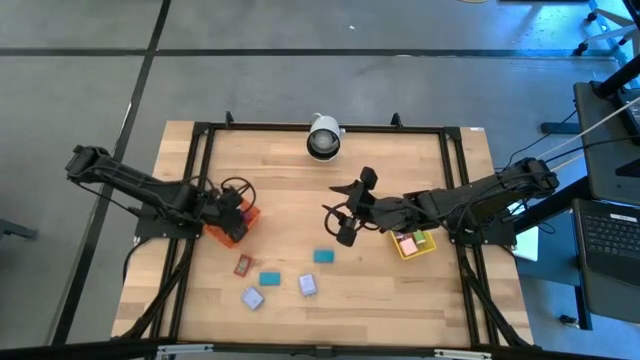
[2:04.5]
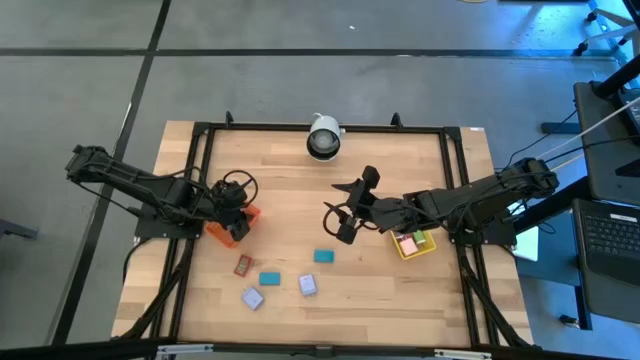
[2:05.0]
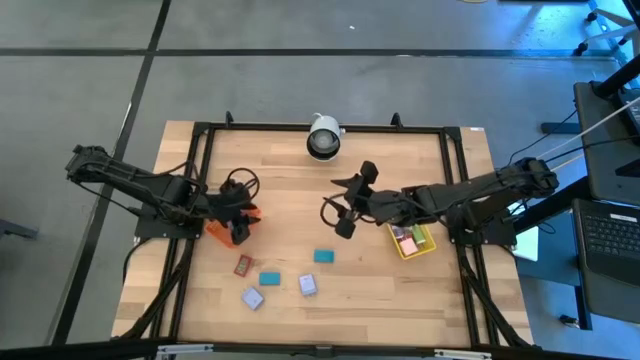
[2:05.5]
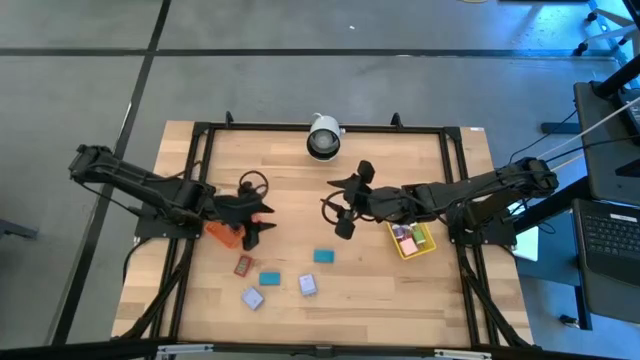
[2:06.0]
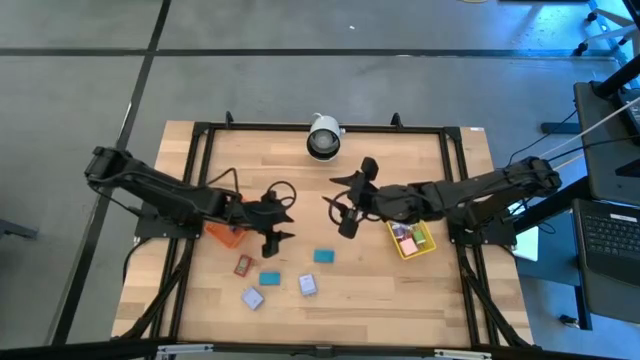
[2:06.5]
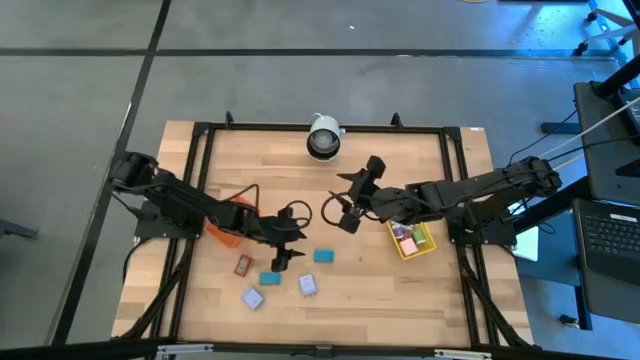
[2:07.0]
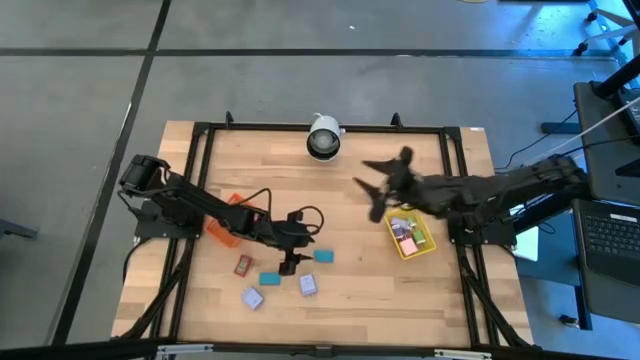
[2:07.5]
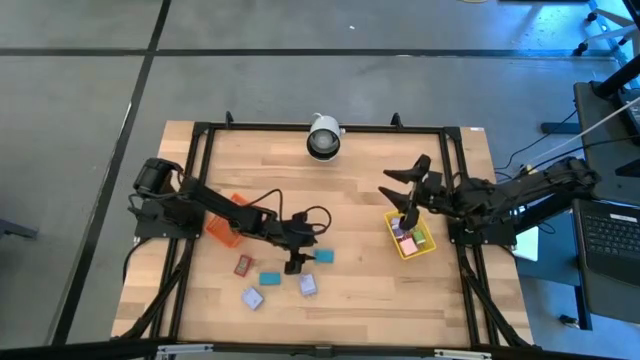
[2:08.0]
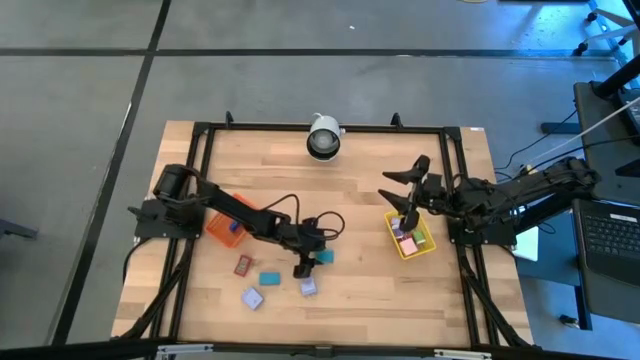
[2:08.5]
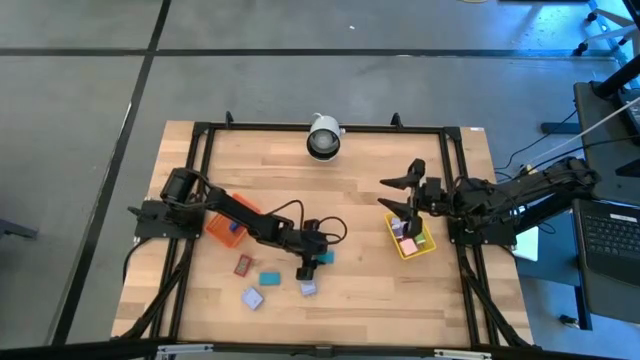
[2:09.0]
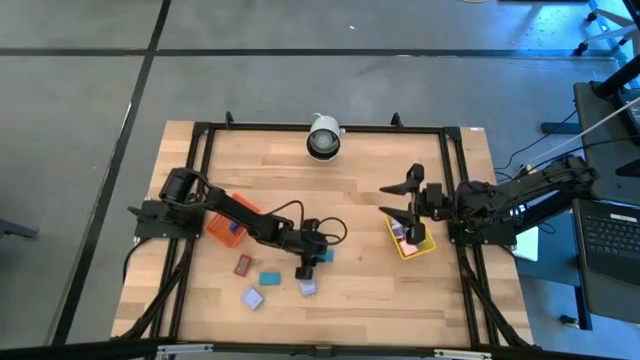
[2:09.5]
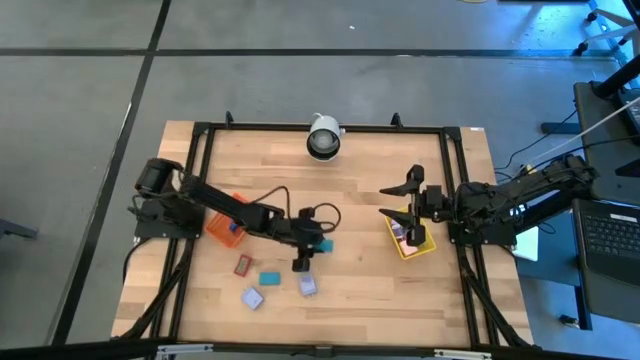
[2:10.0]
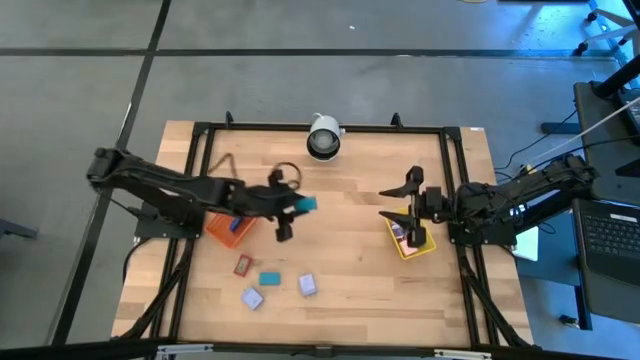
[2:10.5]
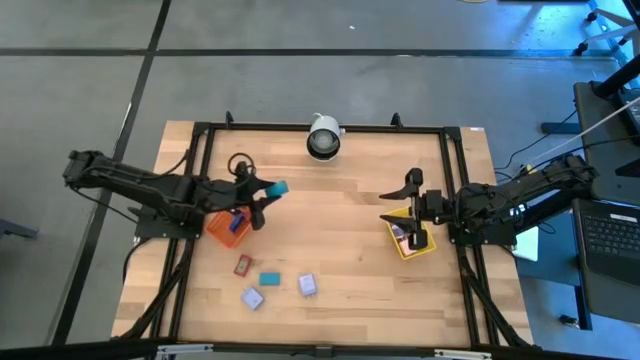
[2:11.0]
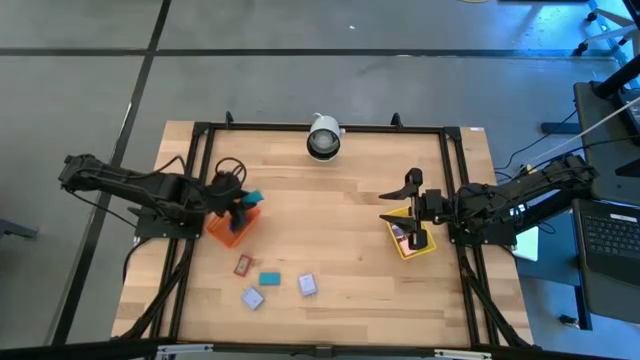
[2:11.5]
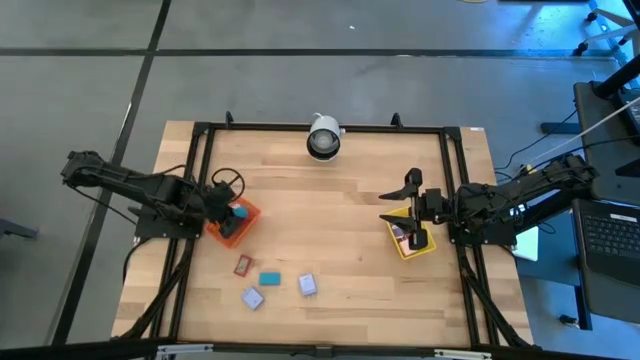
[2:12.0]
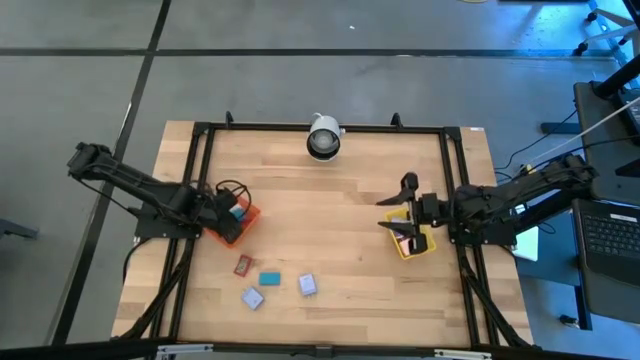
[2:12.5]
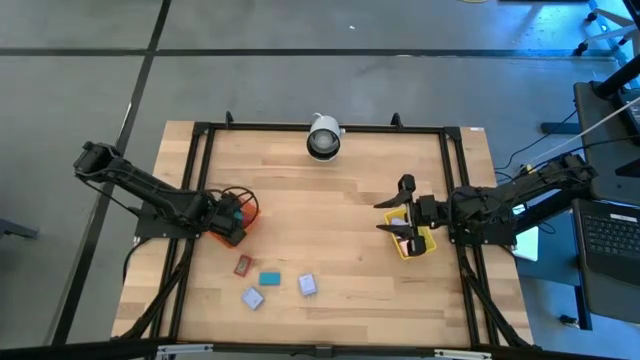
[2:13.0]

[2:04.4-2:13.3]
Task: Pick & Place Office items
Put the right light blue digital clock into the orange basket

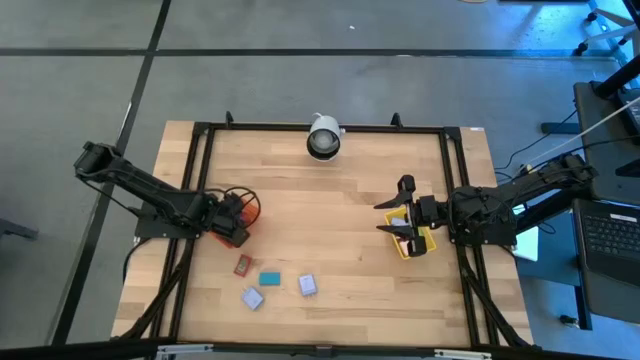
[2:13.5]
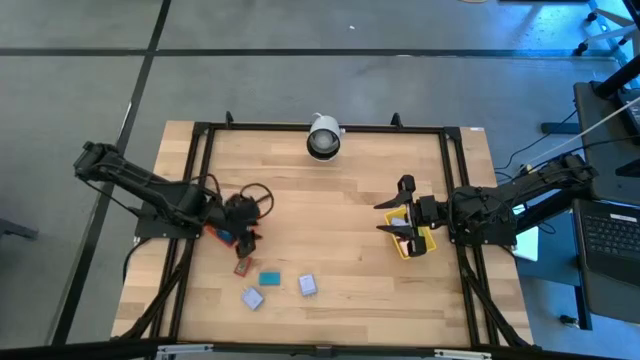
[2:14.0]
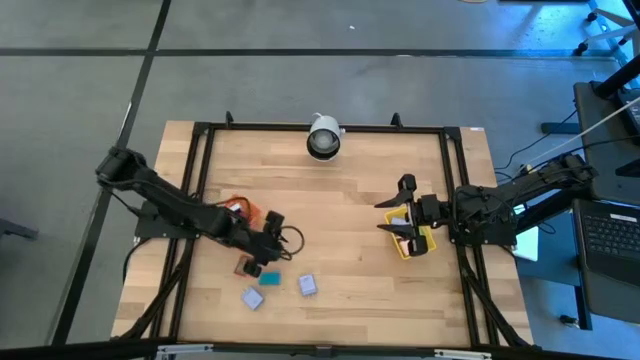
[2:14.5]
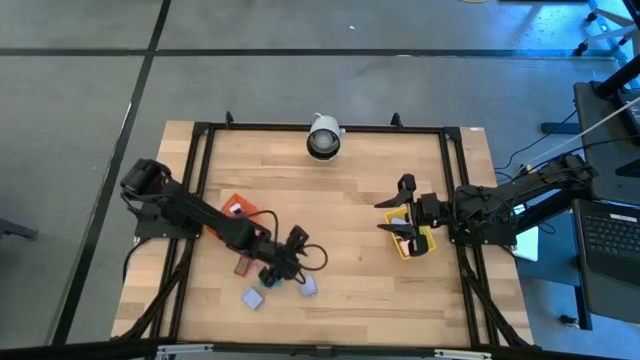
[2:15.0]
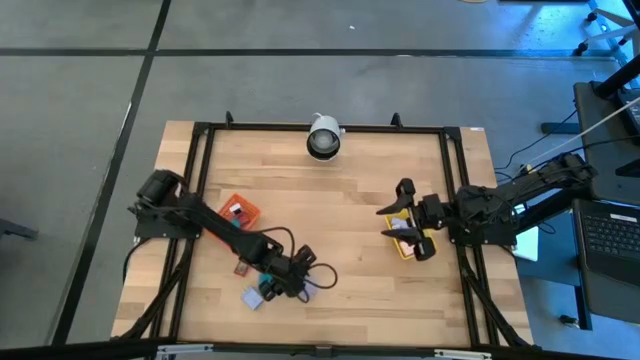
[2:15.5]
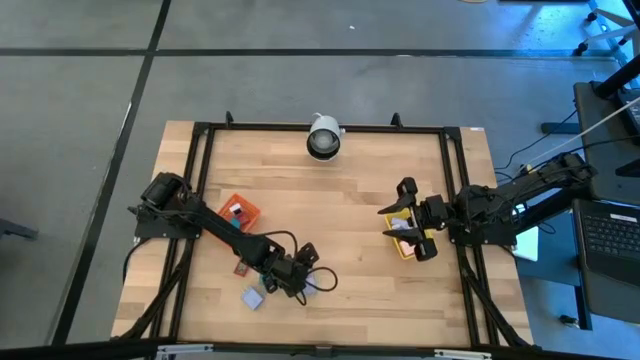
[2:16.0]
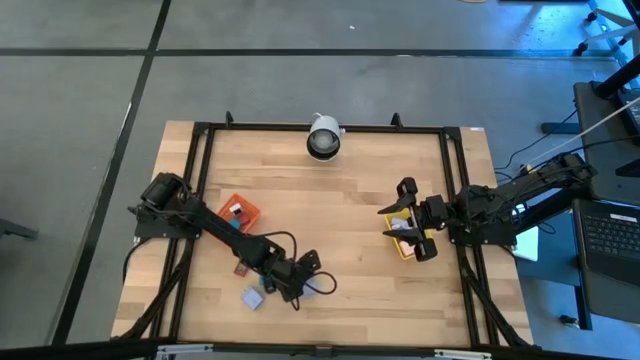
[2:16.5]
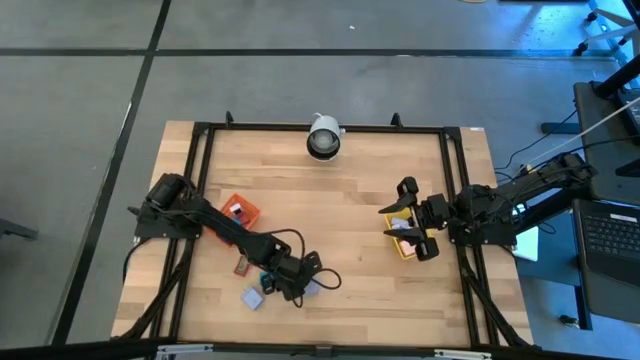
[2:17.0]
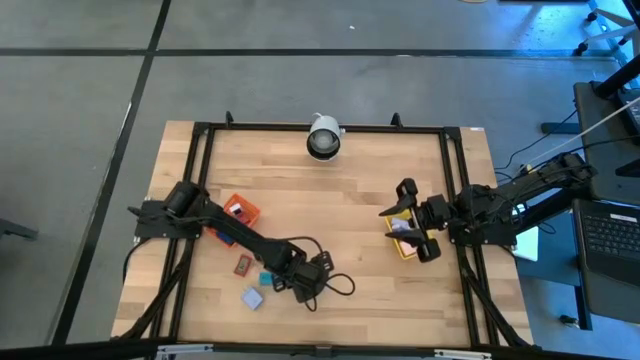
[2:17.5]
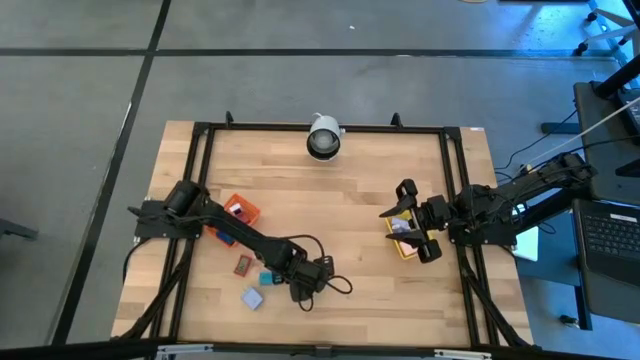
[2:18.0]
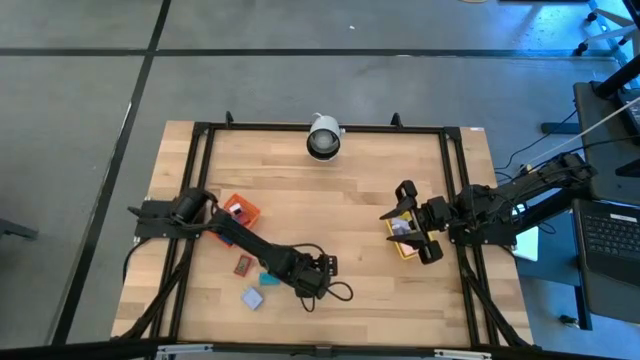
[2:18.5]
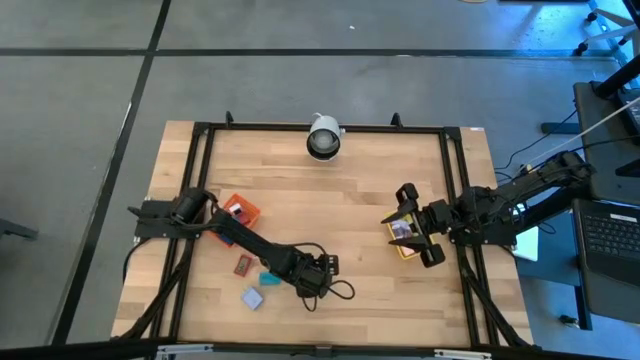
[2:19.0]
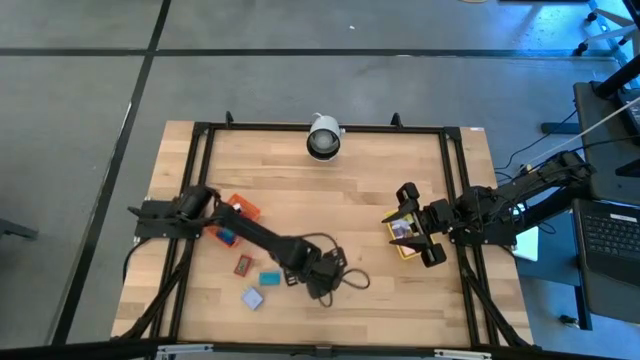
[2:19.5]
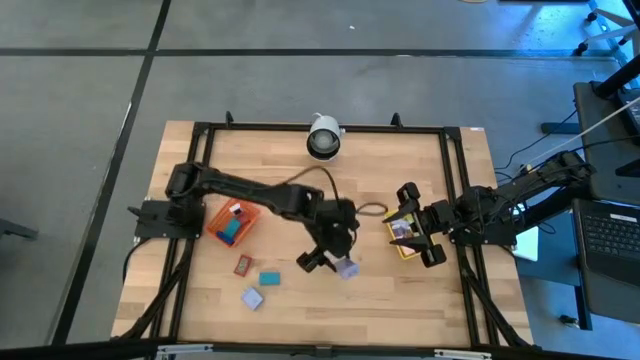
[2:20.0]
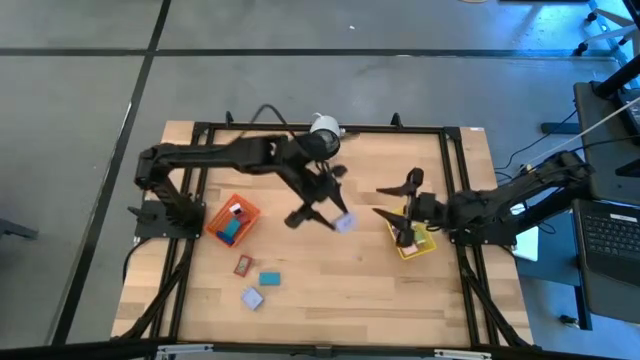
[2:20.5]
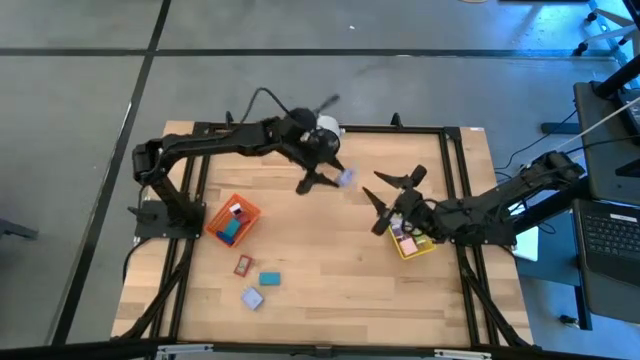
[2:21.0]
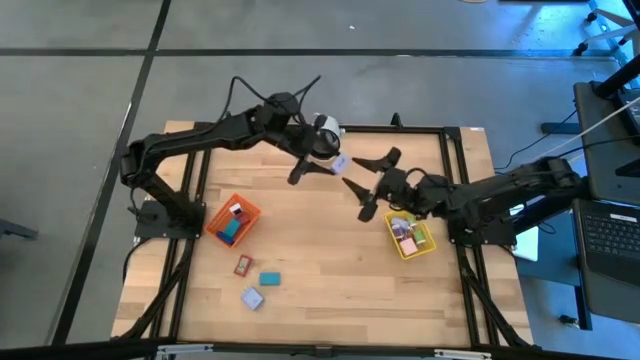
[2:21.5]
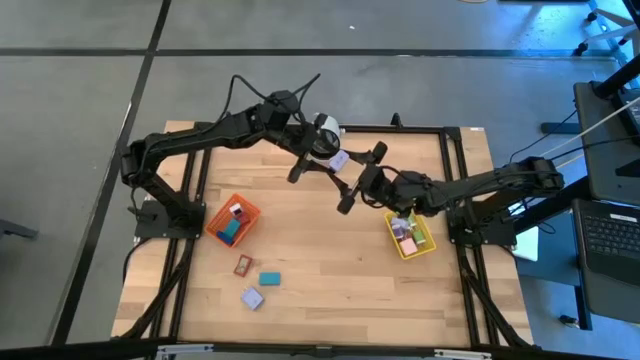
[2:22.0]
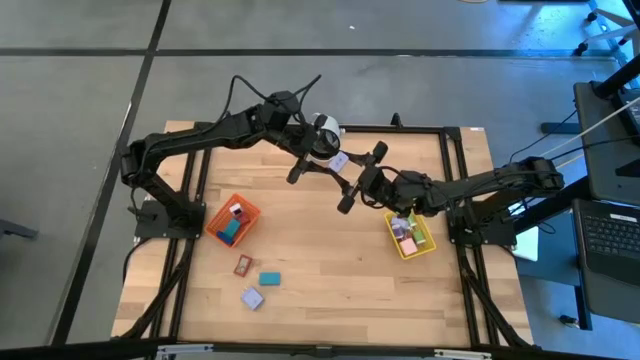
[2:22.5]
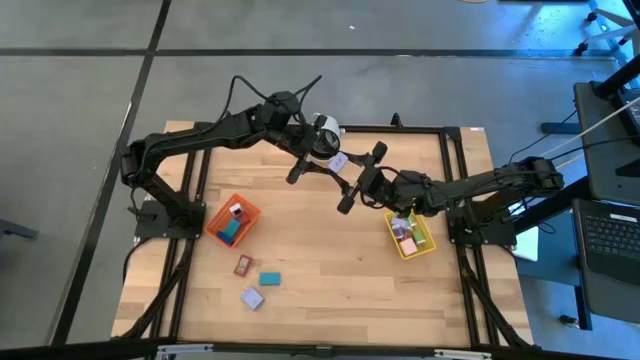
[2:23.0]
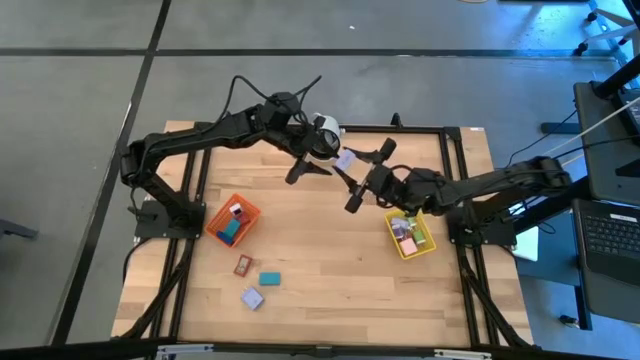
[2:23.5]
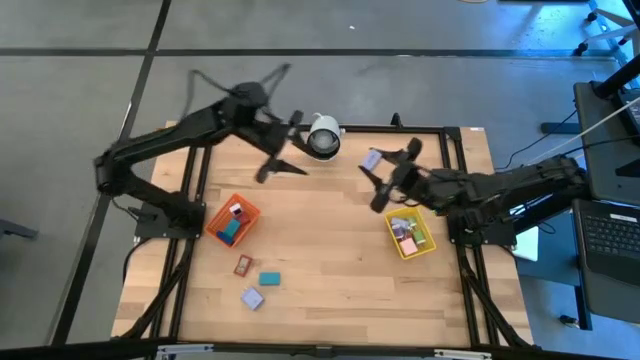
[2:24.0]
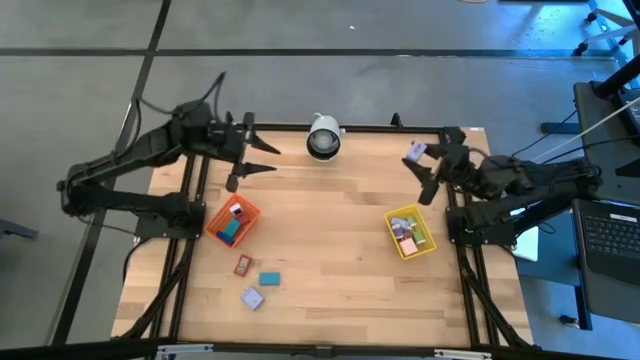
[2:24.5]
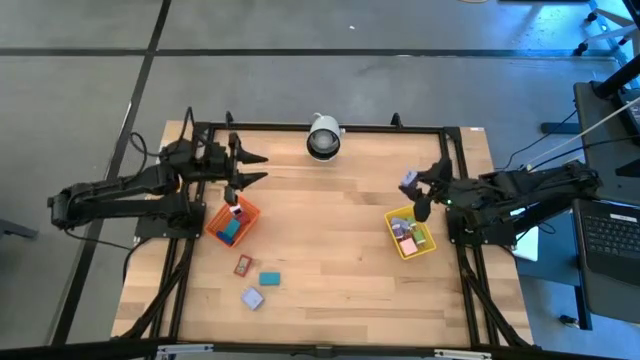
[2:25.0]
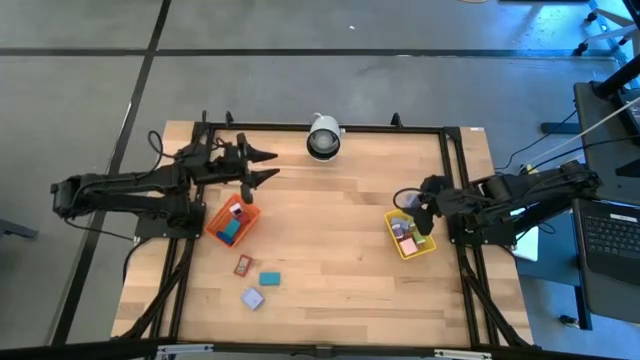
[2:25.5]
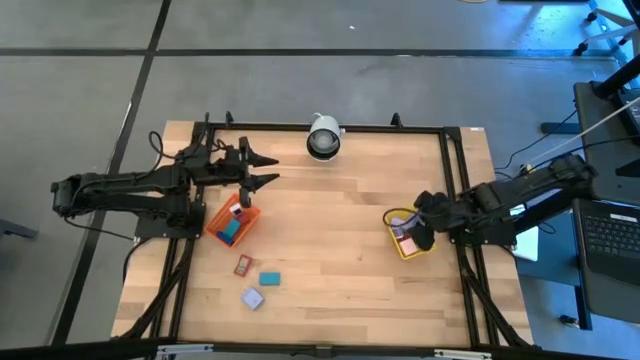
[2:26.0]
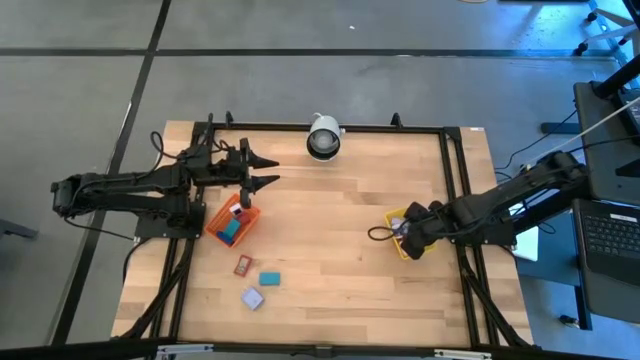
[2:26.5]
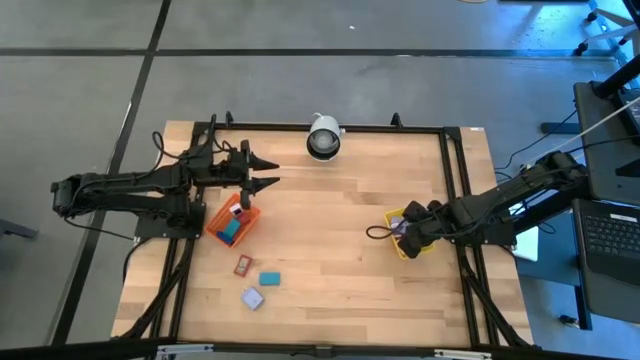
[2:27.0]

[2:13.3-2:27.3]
Put the right purple charger adapter into the yellow basket
